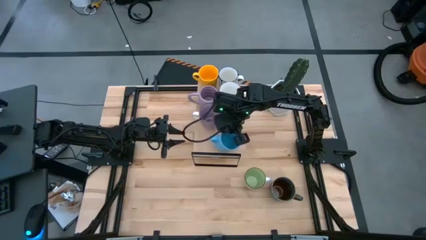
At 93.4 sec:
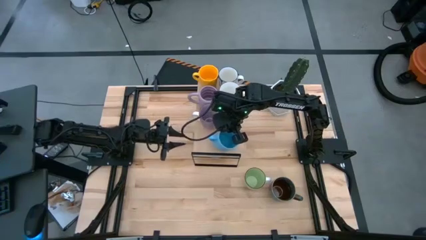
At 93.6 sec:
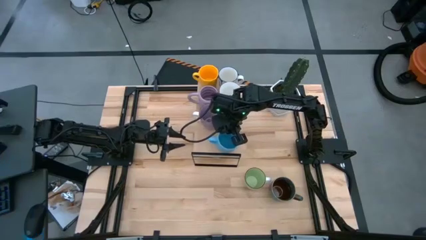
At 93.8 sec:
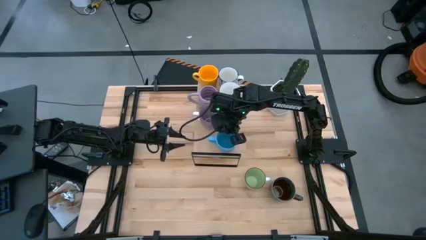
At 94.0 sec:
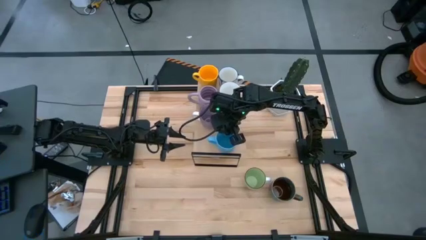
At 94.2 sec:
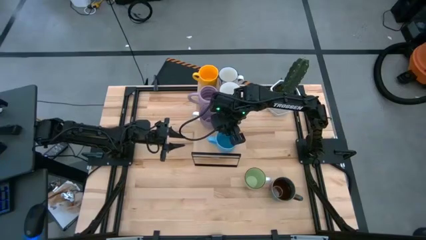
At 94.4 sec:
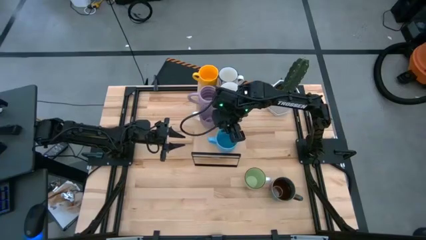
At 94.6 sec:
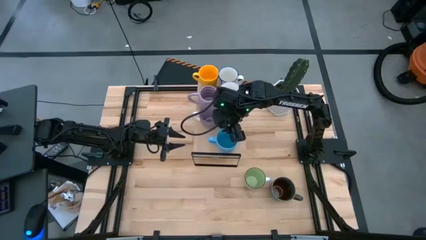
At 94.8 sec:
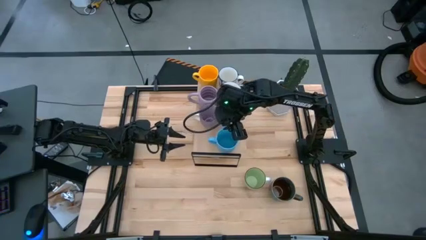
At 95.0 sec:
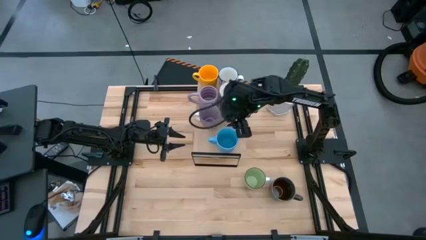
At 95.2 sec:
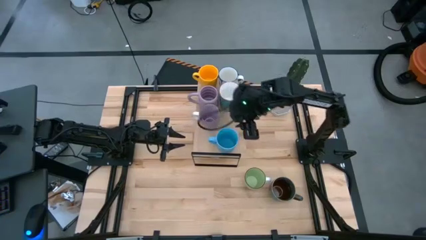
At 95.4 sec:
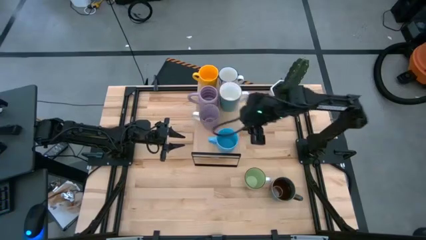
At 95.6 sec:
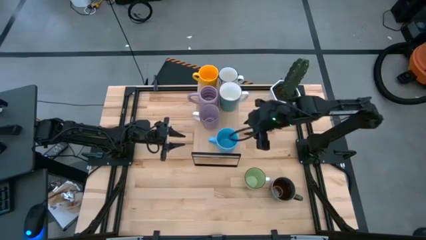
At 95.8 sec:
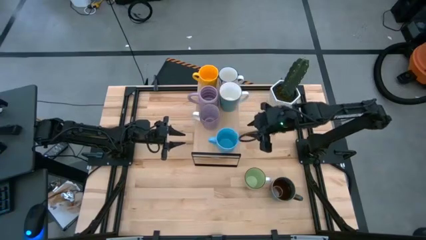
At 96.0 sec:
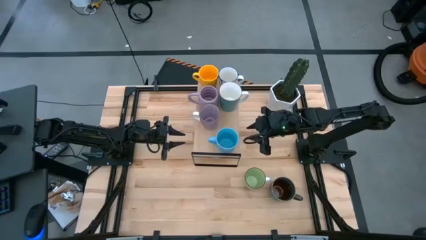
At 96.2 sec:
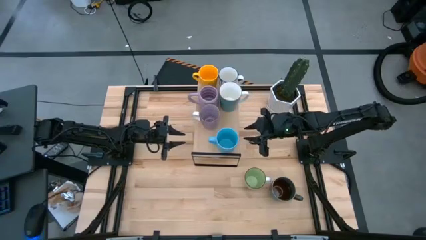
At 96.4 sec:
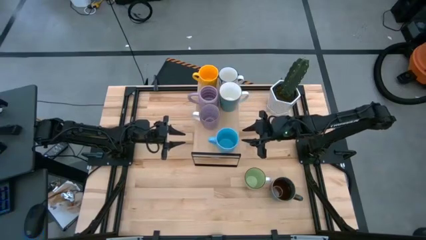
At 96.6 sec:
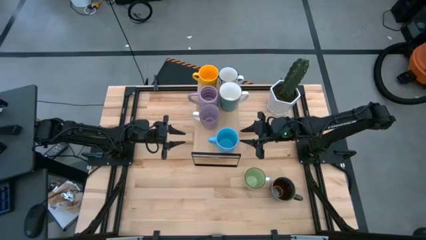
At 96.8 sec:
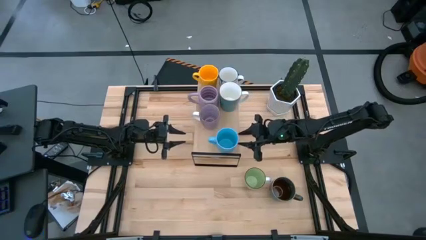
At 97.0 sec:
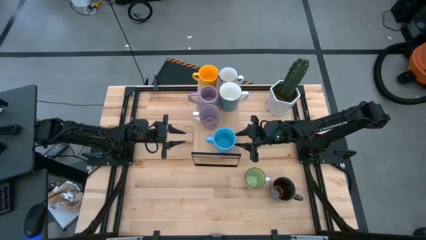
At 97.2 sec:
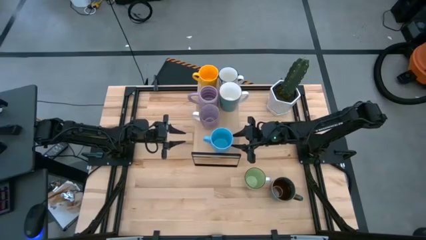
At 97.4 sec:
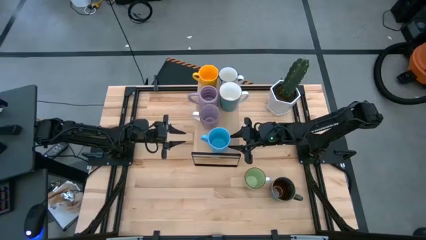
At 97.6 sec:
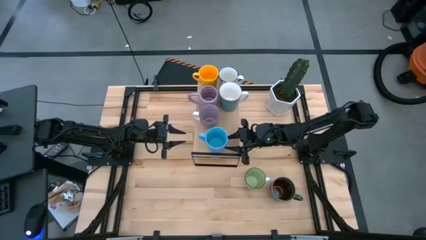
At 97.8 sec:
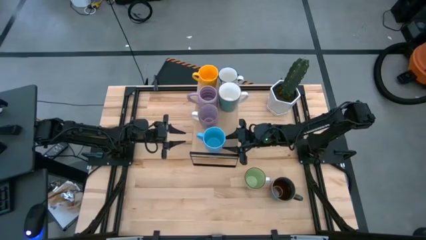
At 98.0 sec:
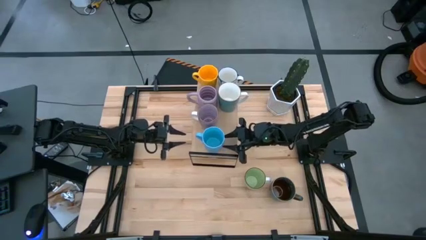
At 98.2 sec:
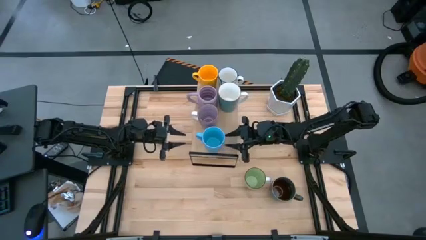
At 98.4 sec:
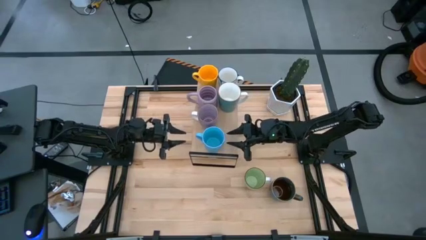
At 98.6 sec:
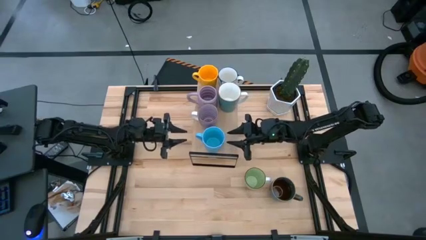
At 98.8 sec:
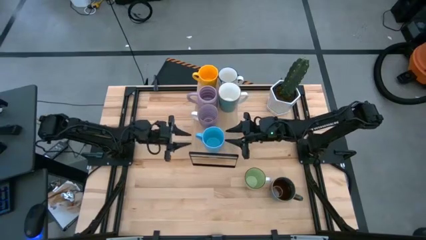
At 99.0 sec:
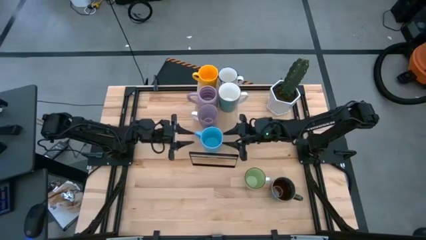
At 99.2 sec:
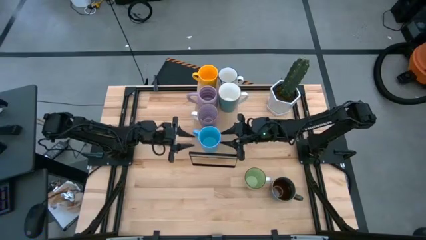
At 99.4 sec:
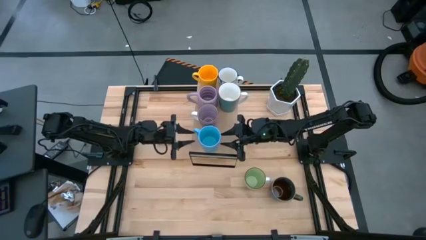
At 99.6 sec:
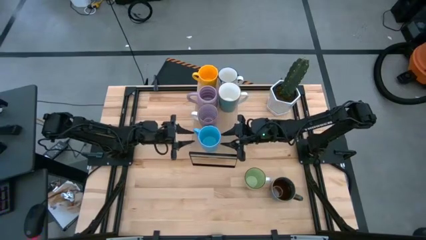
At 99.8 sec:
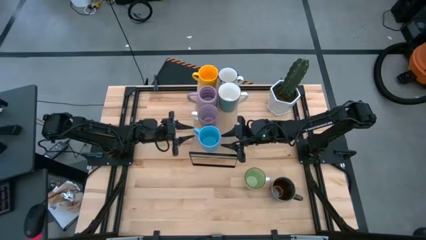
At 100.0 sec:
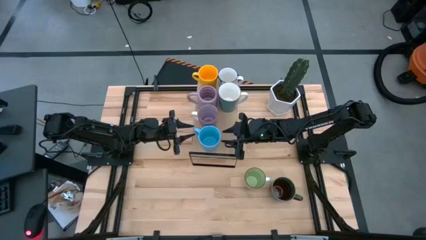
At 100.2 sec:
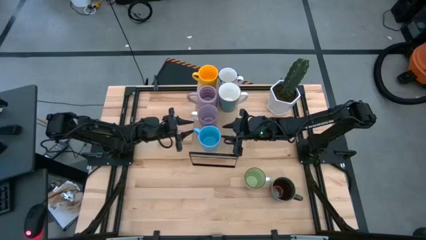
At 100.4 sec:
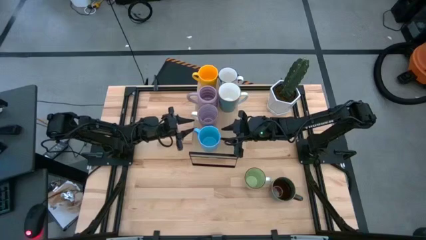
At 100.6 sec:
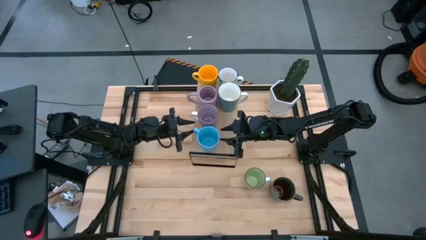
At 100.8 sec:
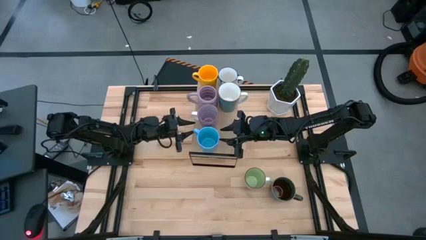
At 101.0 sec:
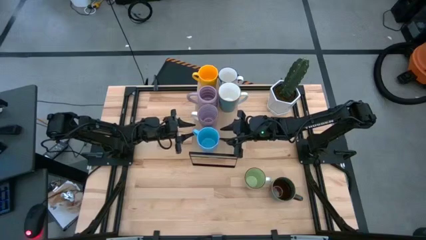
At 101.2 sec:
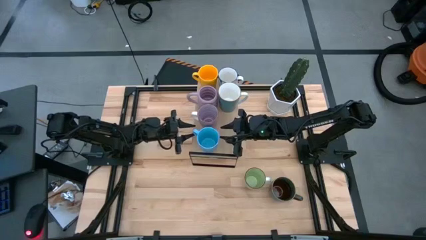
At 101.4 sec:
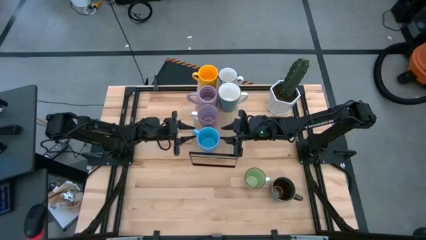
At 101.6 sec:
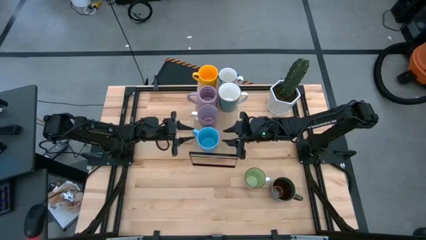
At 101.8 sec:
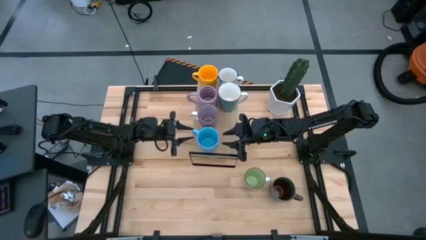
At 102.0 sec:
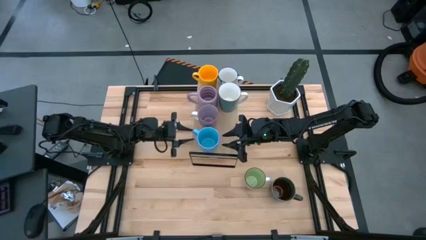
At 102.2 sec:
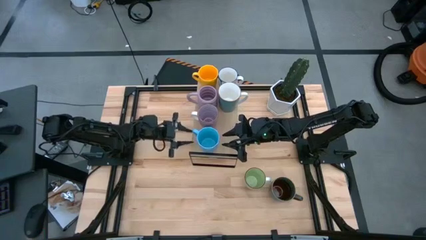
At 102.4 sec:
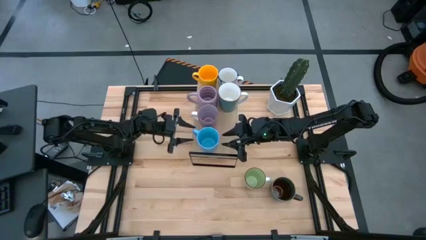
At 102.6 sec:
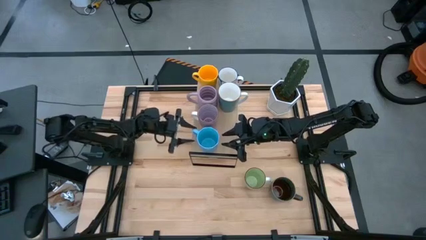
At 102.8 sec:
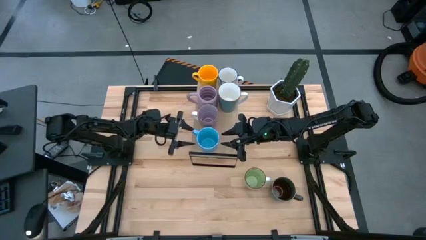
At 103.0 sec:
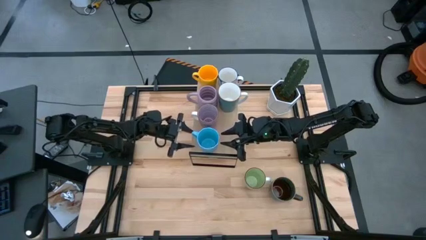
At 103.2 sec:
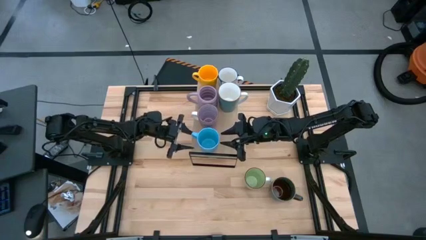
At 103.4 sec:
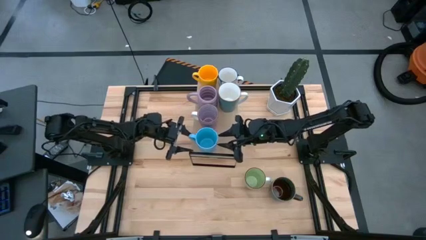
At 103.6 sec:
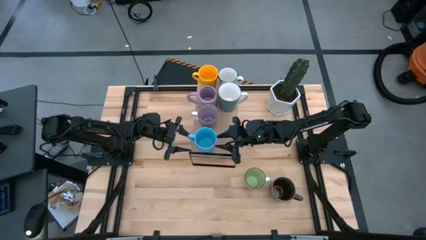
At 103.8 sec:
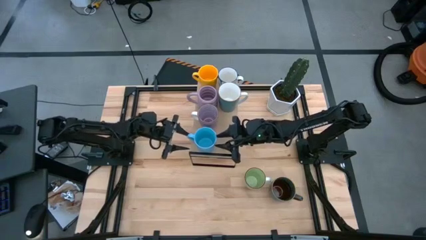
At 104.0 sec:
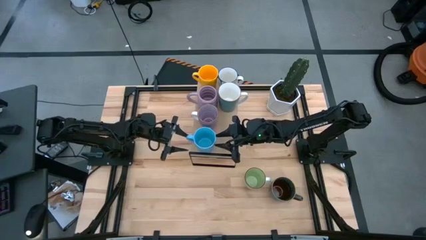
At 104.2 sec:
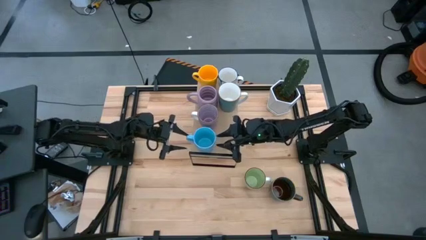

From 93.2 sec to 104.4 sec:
Task: Place coffee mugs
Put the light blue mug on the shelf aligned with the purple mug
